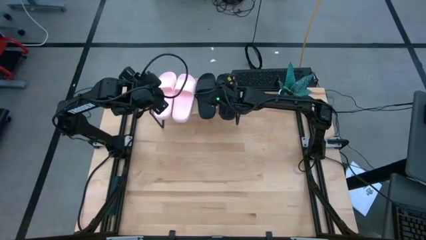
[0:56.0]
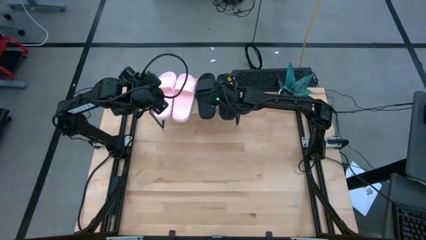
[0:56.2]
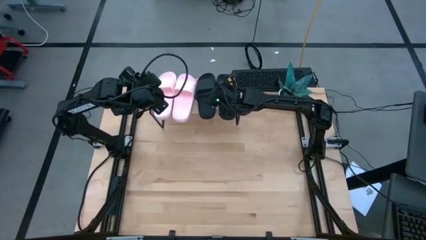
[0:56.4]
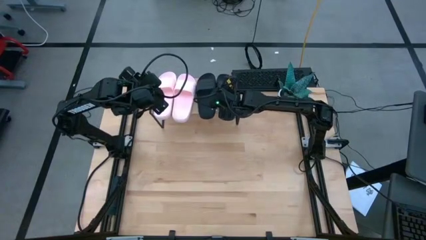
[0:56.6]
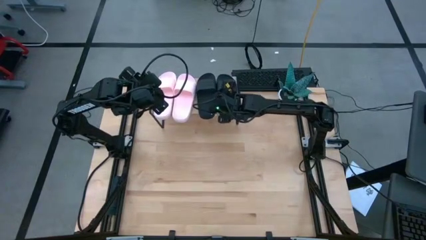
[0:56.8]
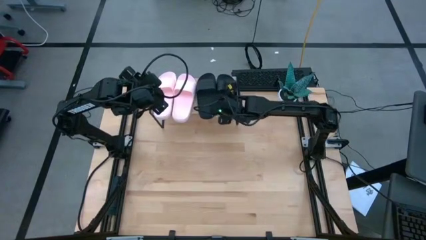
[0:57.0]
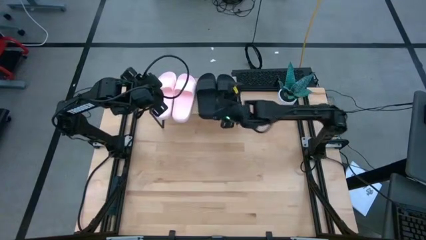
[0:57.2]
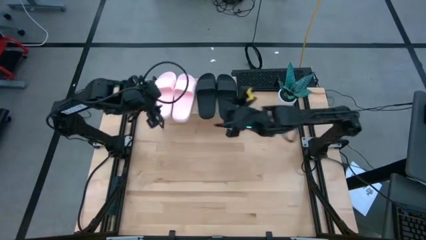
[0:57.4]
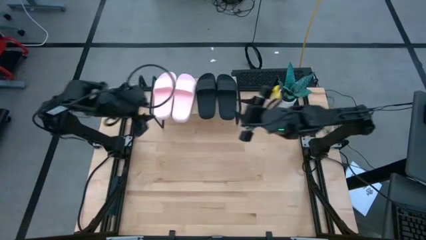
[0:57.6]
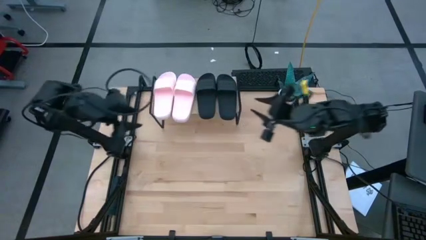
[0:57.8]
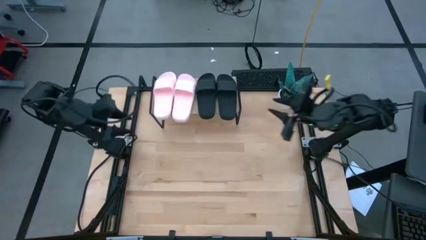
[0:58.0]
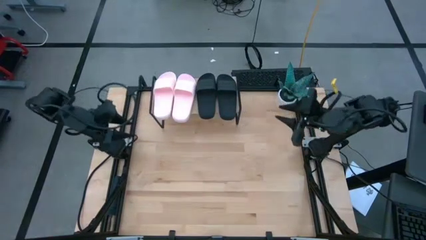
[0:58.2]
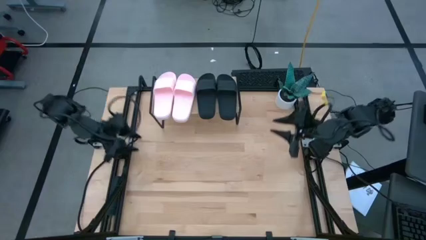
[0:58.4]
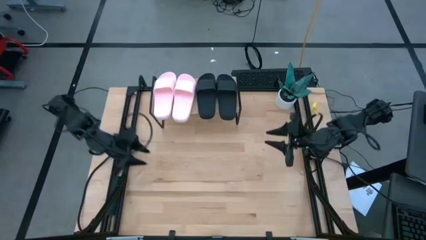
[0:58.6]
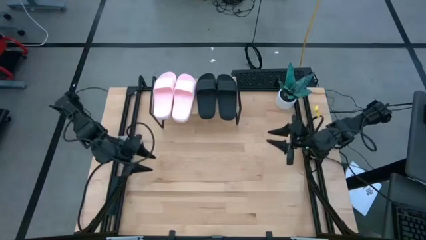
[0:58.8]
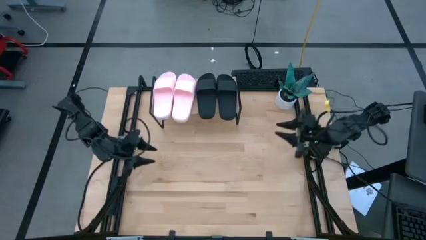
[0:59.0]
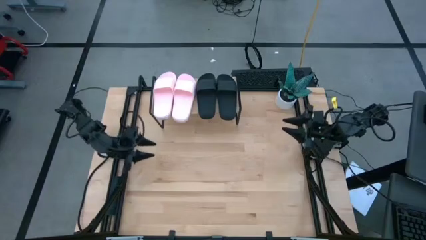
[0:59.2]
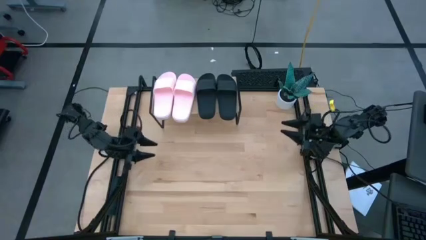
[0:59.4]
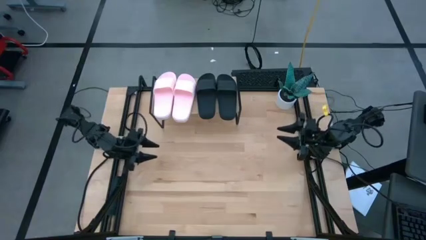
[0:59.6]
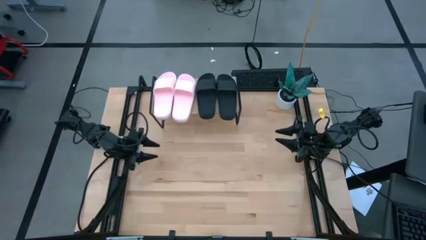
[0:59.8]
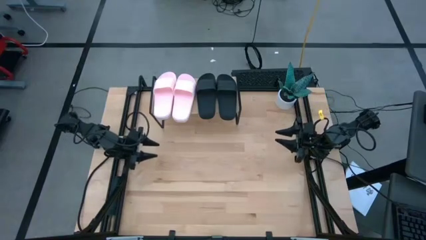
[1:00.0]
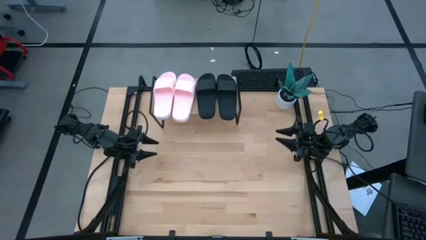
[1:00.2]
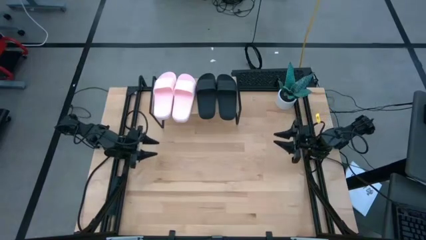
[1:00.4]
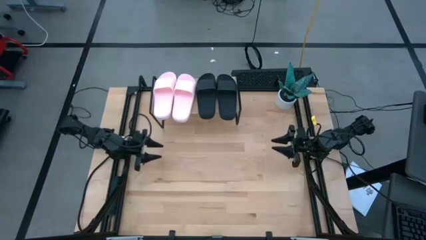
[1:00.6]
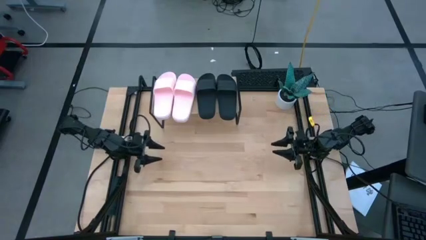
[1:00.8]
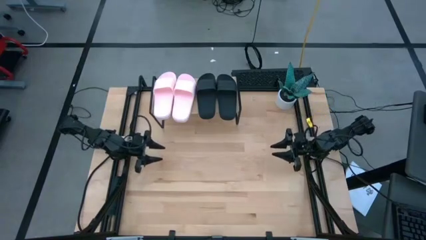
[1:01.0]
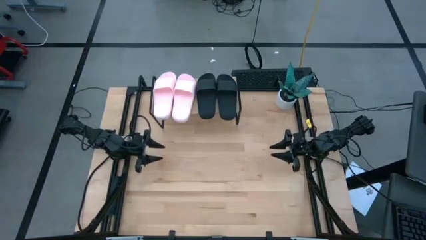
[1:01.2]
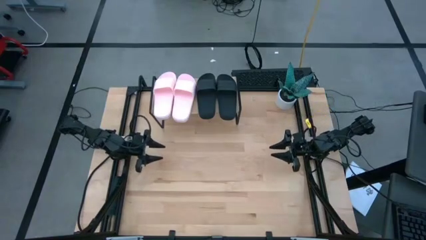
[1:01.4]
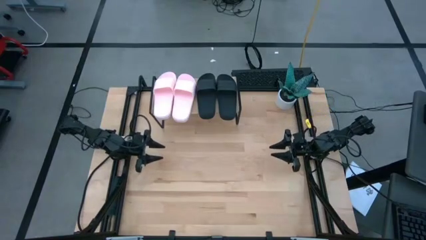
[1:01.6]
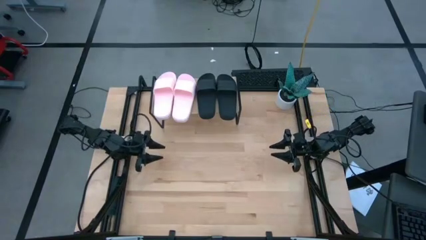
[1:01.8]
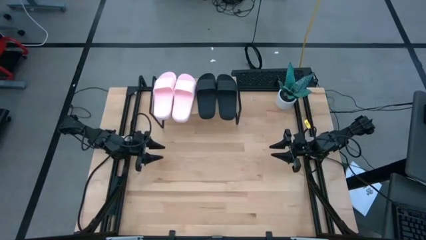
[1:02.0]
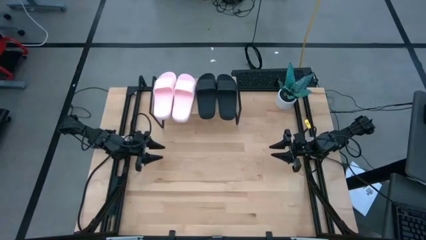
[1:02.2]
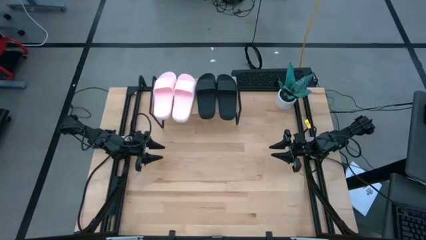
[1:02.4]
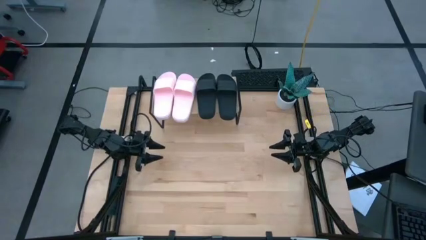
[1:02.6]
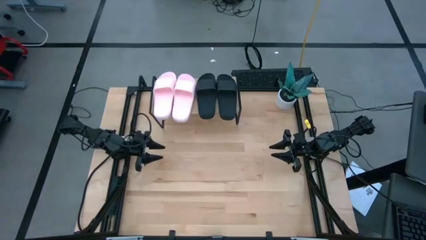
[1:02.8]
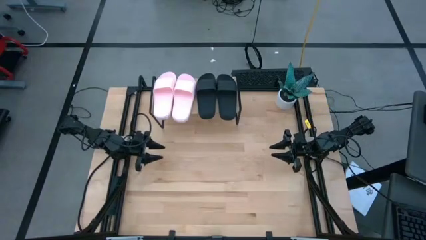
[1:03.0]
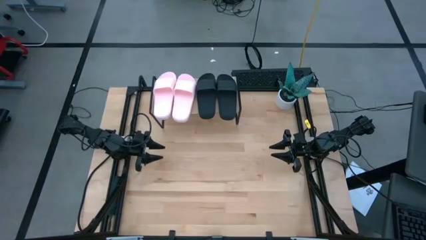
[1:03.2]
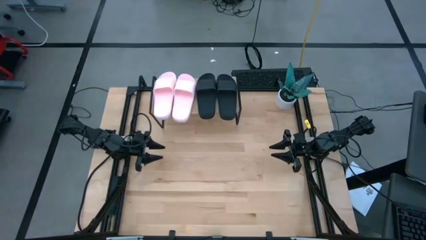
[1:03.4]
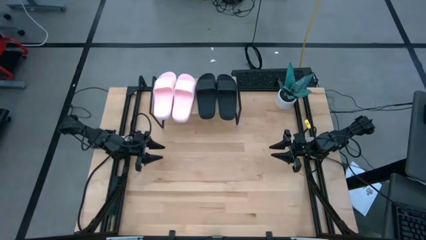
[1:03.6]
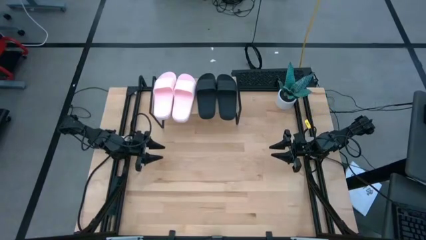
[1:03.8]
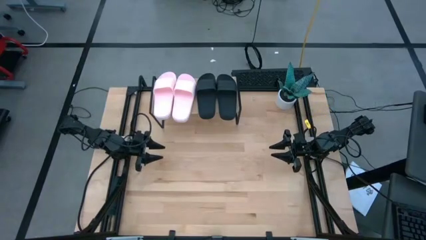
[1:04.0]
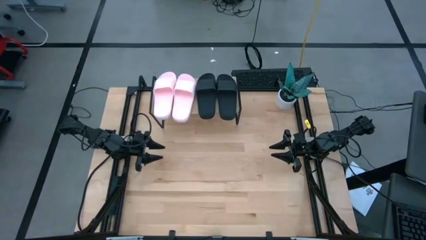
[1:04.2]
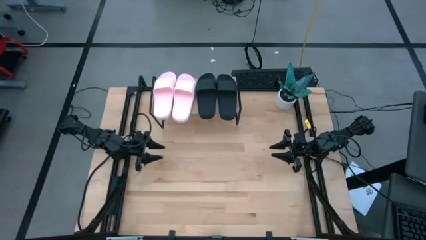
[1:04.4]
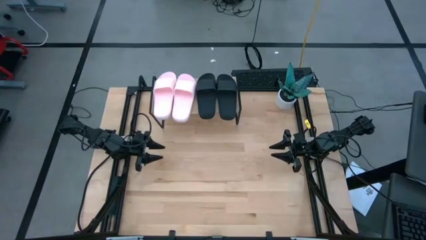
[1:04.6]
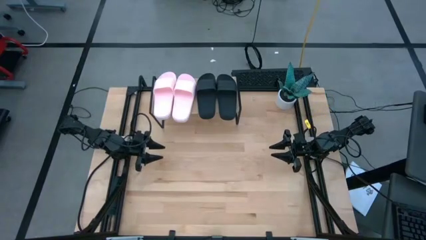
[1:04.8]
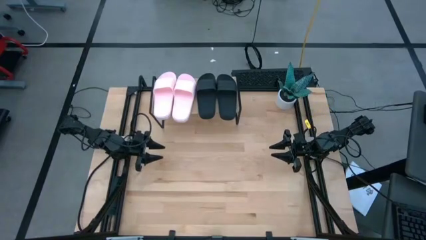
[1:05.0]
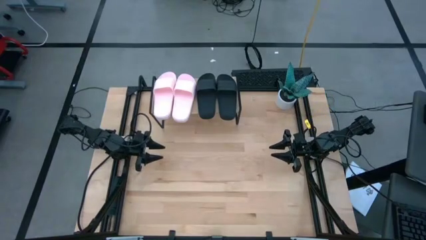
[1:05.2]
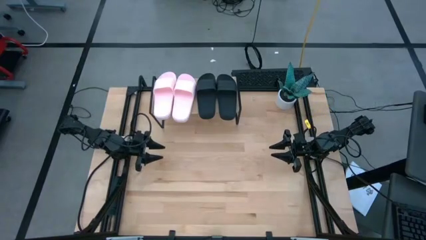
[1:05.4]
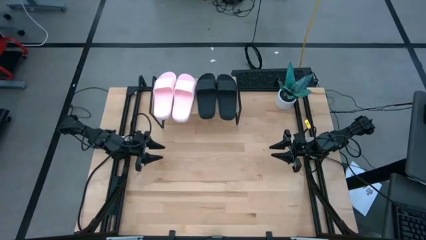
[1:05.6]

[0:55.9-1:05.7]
Task: Pick and place slides into the shelf
Return to Home Position

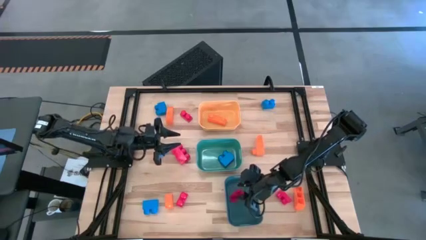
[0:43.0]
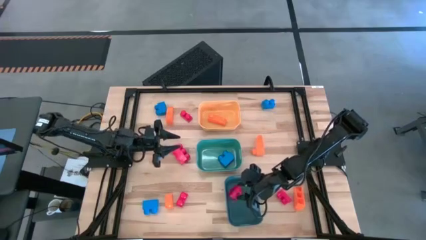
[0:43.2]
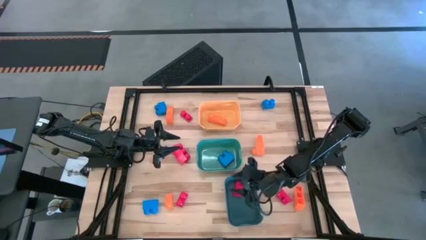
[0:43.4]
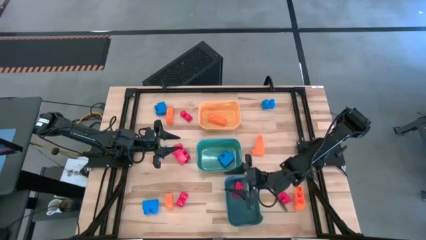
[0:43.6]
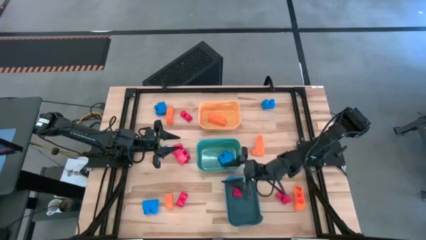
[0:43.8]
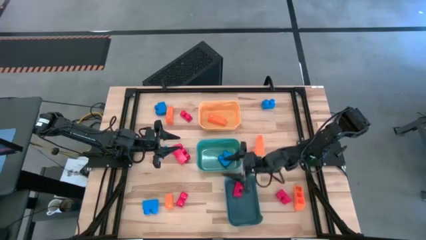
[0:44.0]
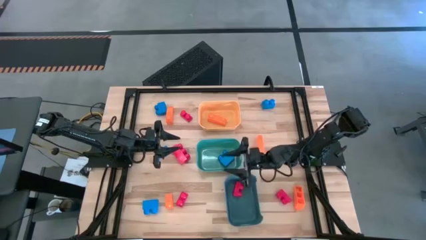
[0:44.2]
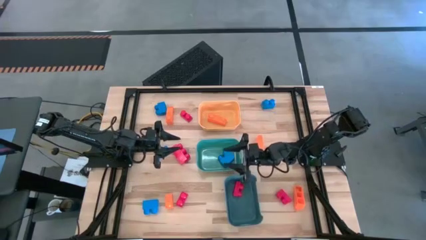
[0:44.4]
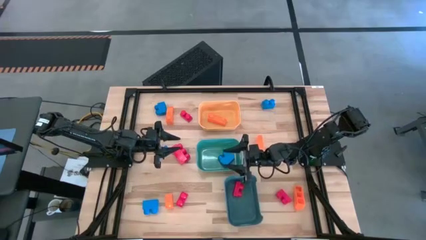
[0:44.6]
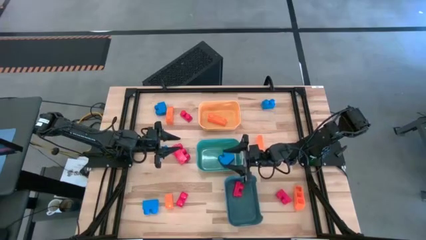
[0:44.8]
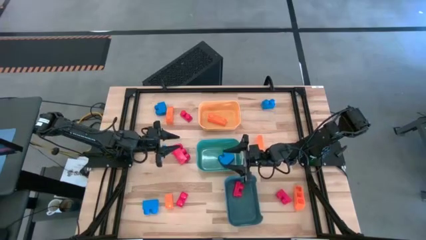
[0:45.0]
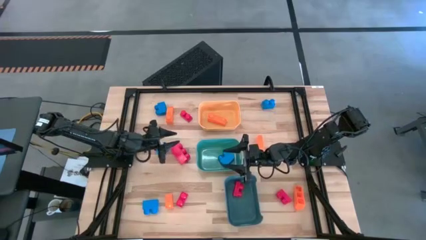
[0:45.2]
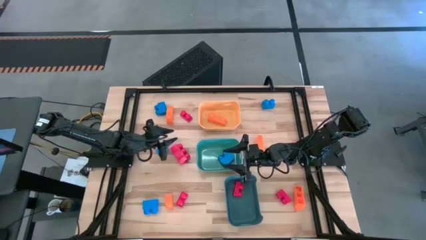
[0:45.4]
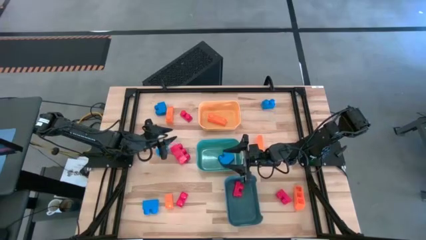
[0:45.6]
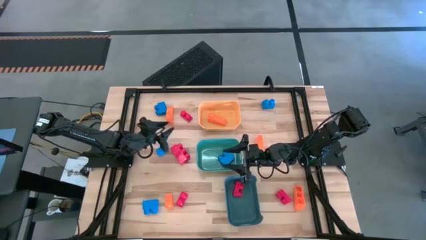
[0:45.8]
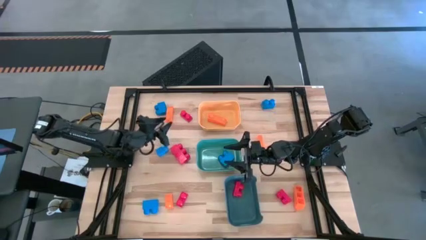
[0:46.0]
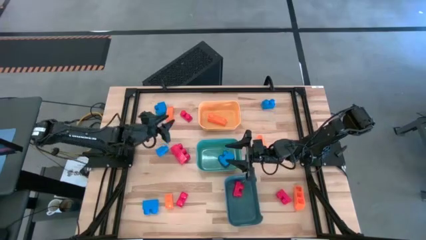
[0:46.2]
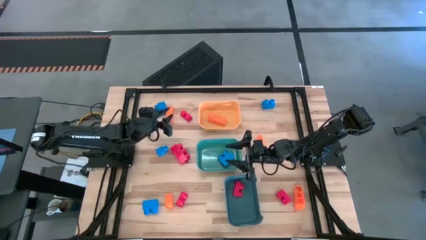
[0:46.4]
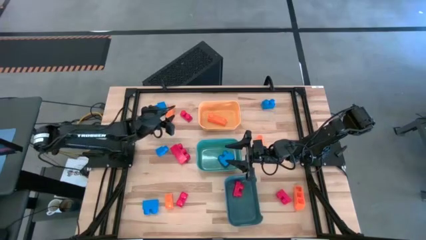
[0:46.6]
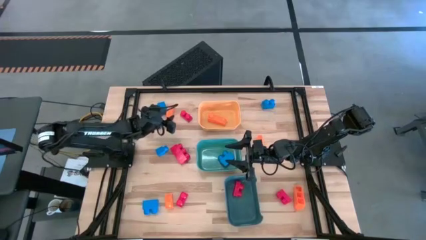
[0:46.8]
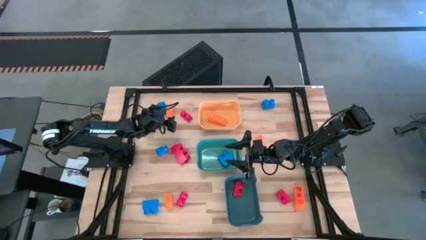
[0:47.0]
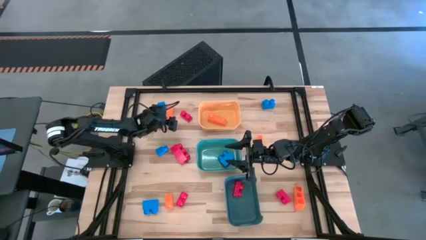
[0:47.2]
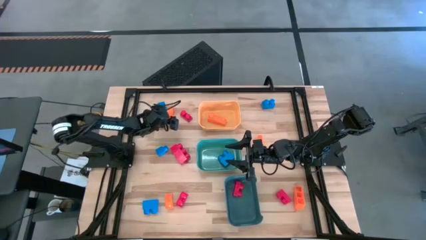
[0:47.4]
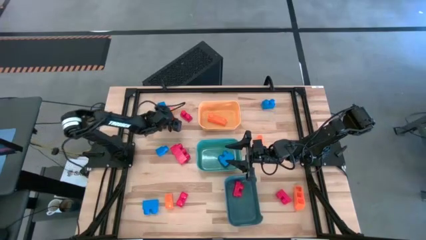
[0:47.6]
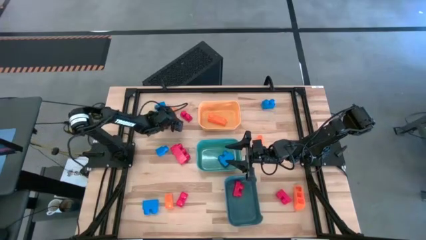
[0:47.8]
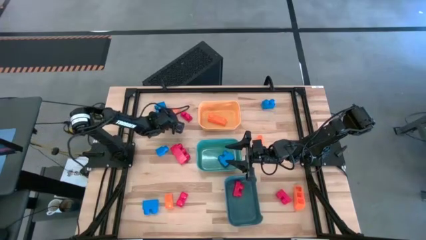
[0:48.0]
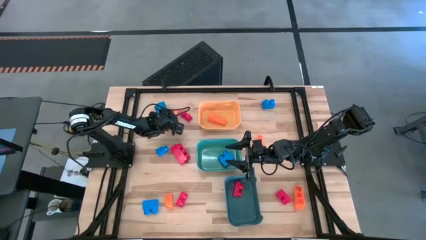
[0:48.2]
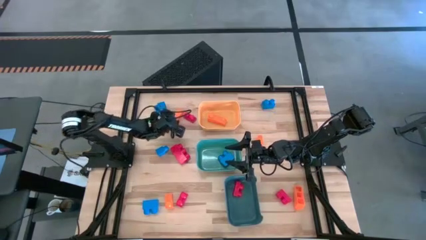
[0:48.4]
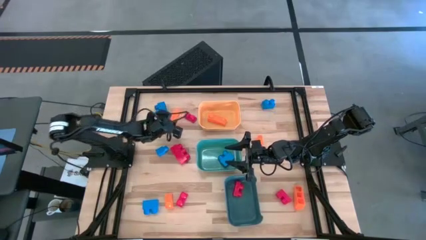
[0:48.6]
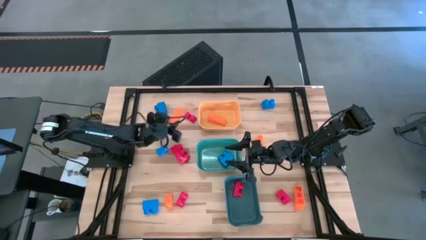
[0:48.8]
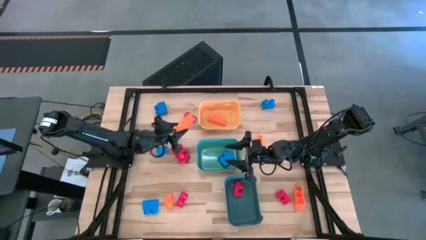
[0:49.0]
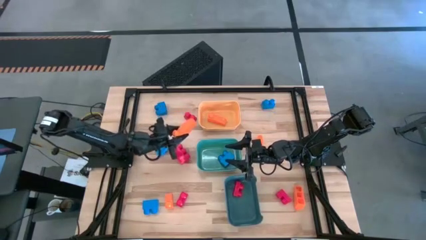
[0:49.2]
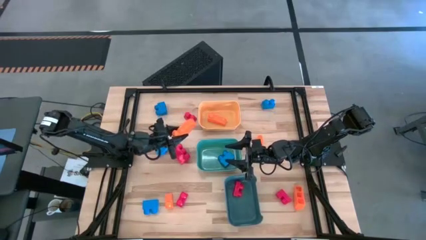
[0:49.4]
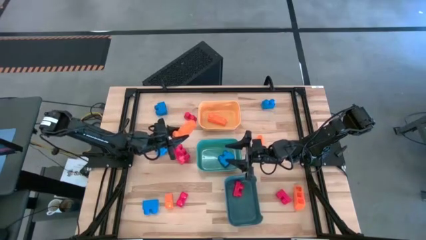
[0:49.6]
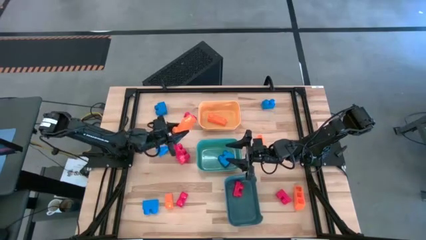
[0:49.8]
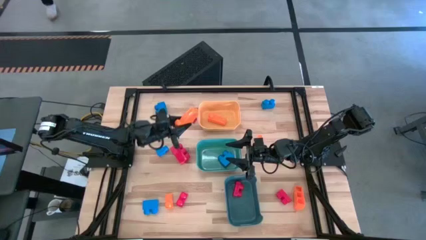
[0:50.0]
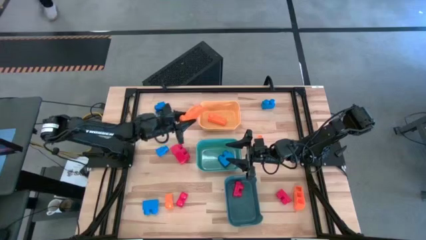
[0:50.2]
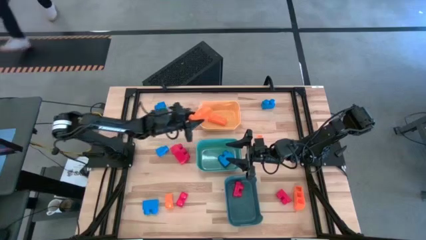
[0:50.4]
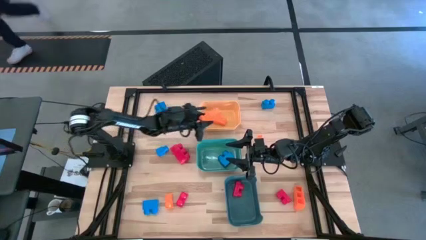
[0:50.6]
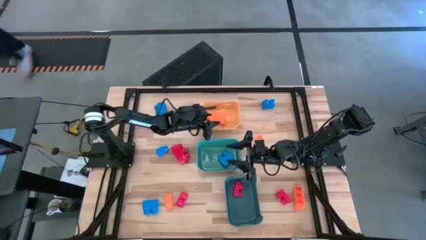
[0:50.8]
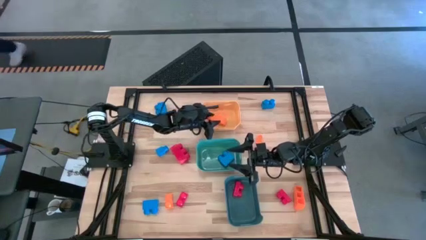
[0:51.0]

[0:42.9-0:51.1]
Task: Sort & place blocks by color
Put the orange game piece into the orange bin
